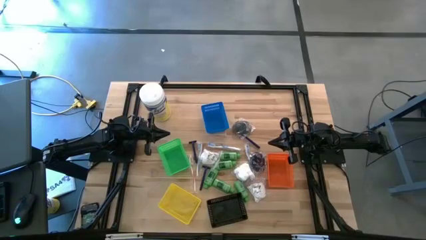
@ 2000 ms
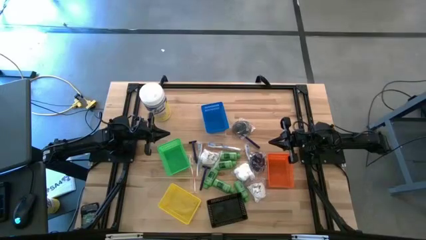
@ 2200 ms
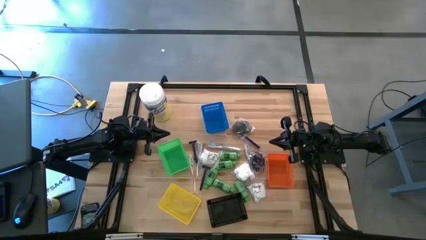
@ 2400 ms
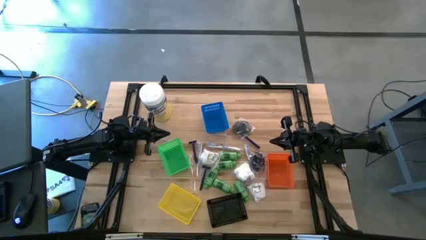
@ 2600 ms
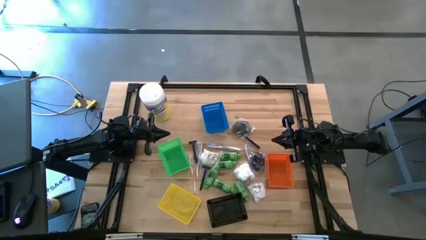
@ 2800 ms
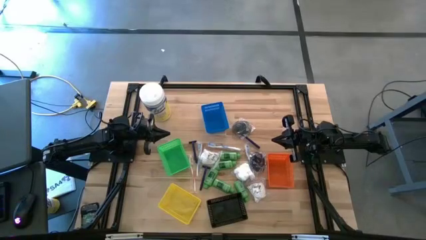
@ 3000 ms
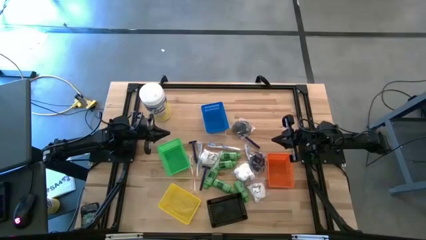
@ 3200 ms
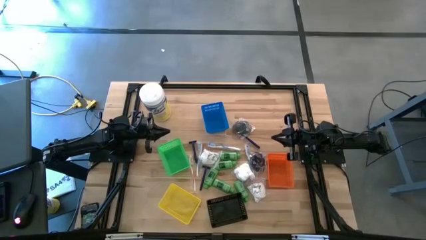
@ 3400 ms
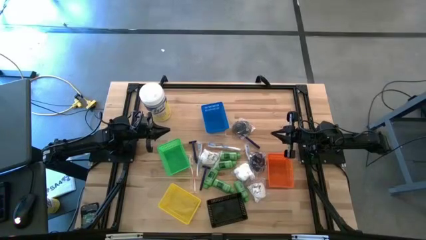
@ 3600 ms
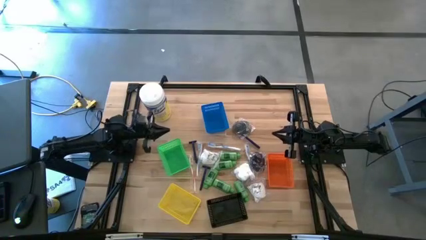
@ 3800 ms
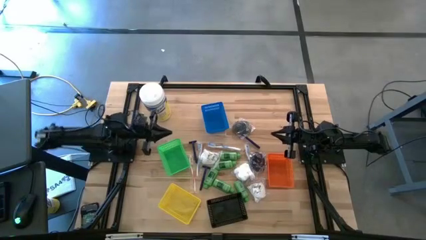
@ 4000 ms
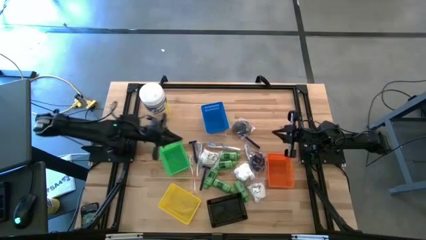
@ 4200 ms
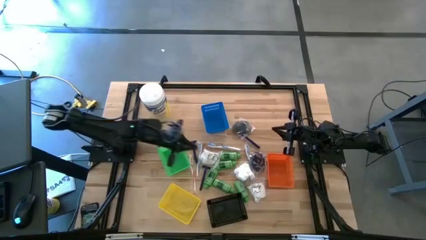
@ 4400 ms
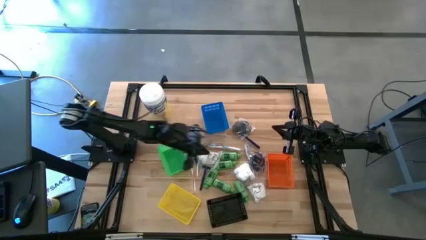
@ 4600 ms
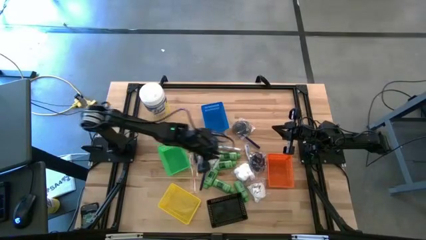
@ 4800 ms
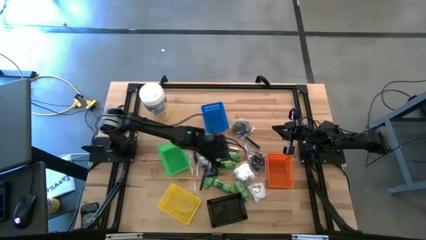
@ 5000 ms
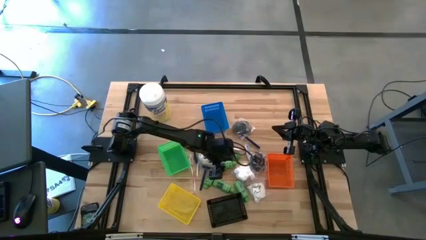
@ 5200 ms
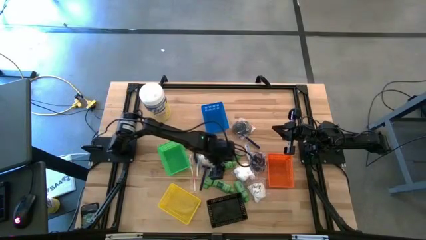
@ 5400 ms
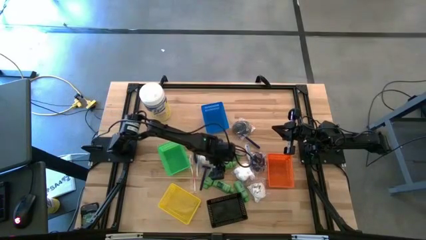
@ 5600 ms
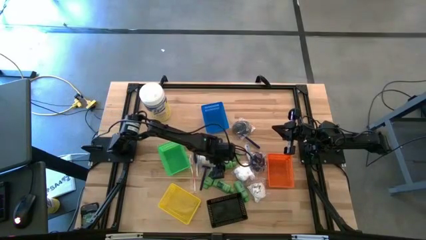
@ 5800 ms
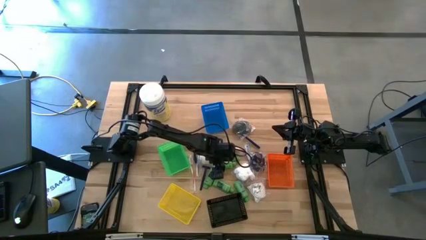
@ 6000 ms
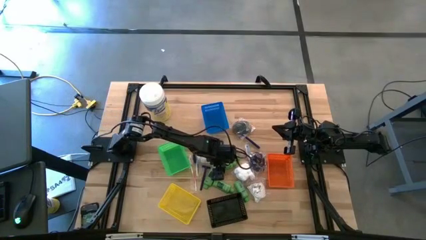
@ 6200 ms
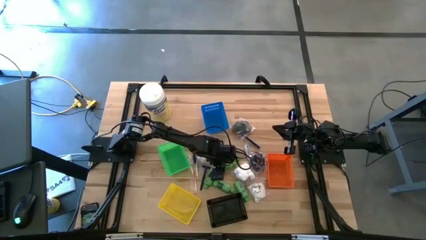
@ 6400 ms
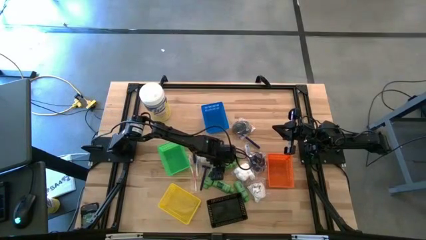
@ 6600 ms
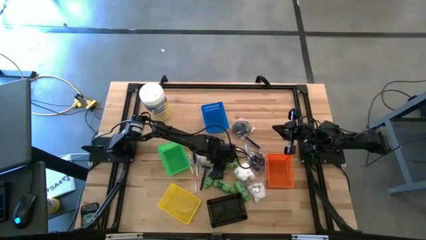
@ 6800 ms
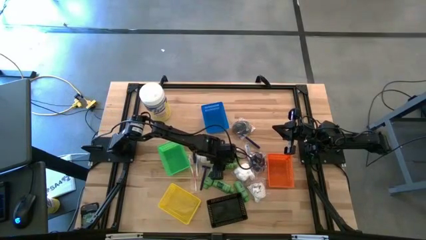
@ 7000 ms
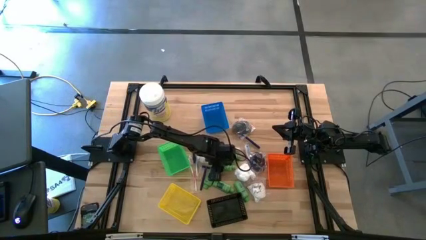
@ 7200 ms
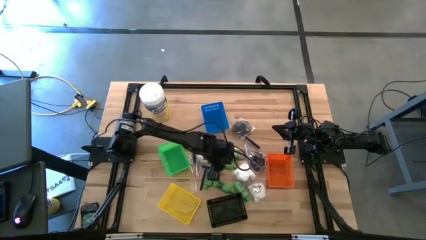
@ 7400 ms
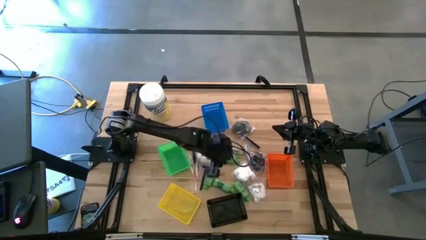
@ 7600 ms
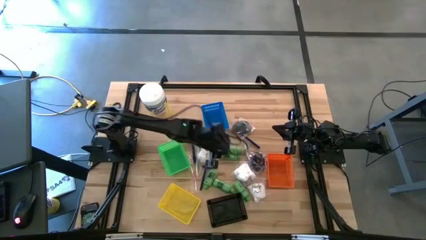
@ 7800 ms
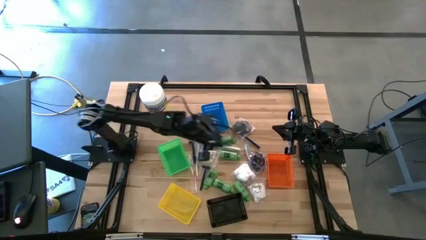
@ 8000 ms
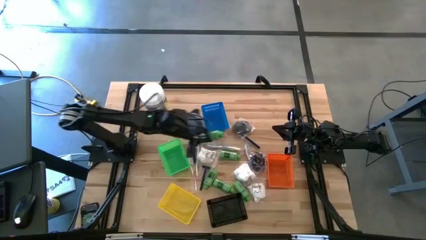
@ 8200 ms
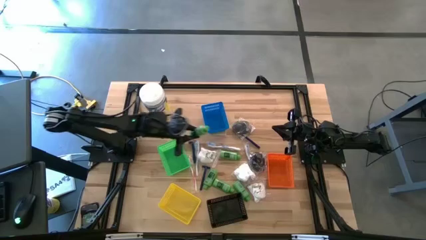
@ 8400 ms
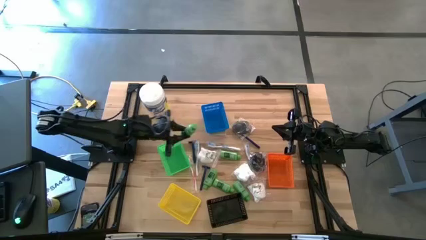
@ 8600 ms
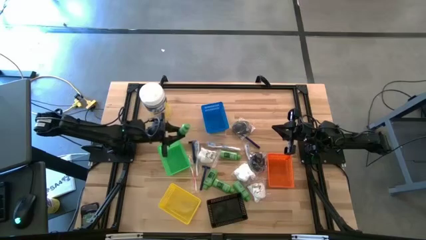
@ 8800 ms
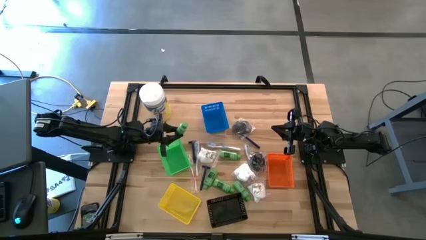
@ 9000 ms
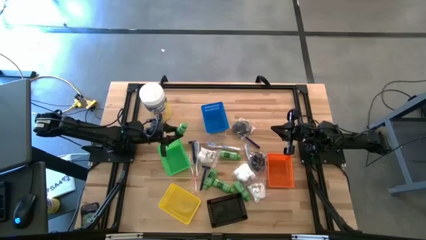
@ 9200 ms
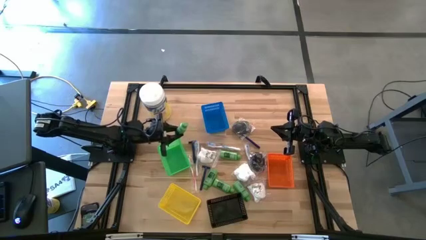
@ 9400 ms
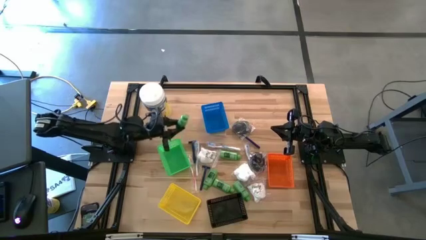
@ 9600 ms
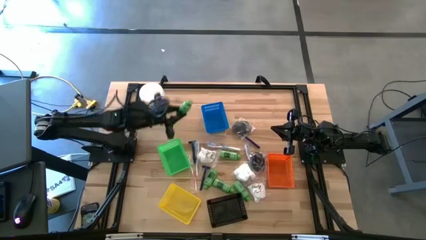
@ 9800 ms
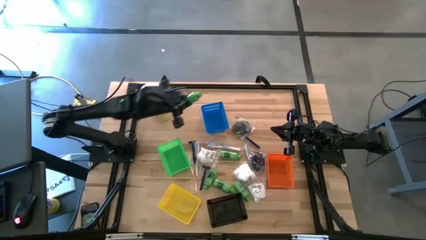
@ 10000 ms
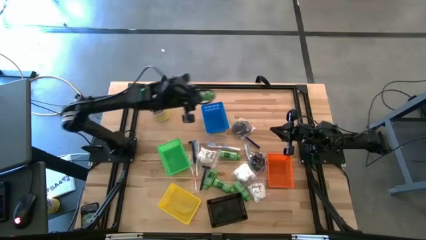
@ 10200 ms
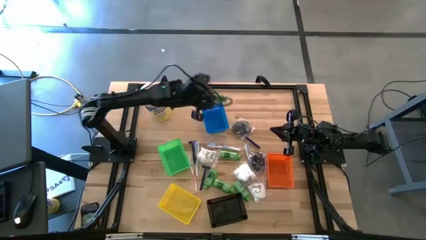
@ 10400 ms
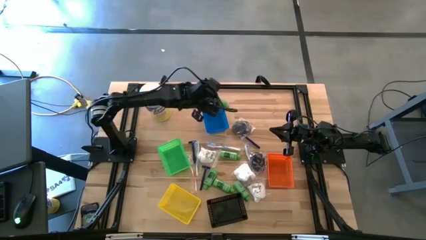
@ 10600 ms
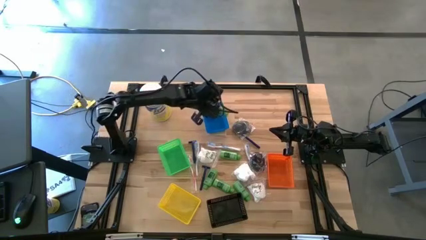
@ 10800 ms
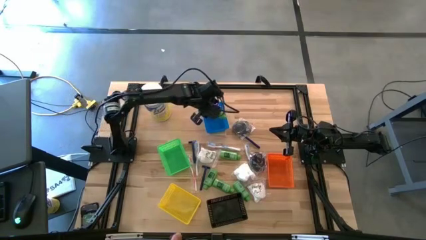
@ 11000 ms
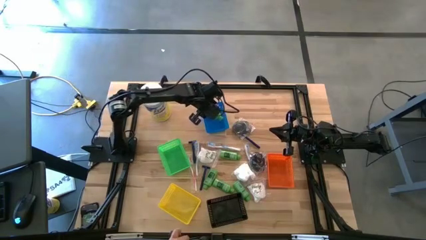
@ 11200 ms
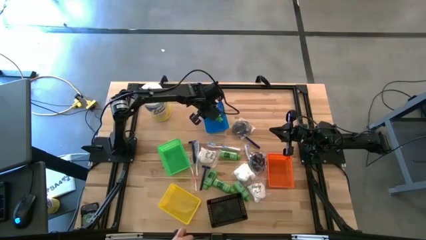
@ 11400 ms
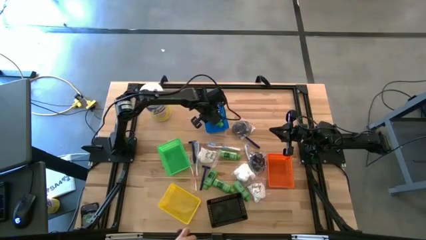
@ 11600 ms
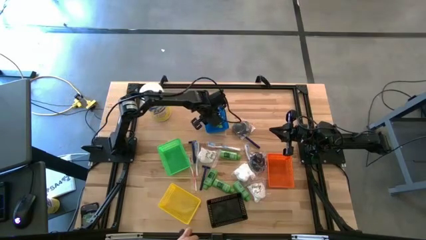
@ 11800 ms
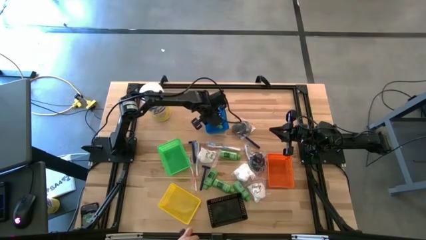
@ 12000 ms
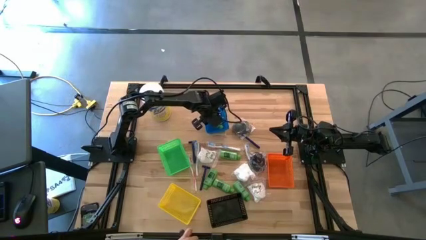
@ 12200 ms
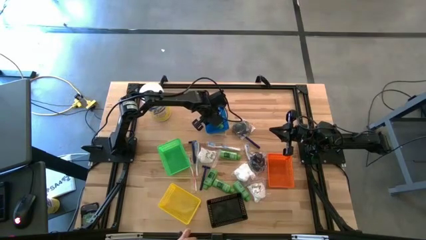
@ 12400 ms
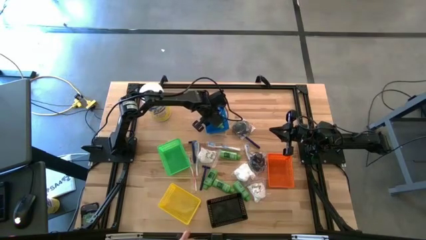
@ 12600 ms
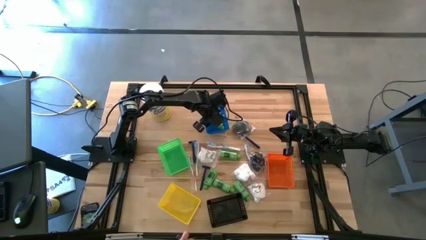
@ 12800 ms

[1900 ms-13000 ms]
Task: Pick & Place Travel size toiletries
Put the shampoo bottle into the blue bin

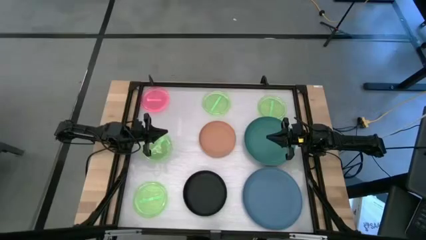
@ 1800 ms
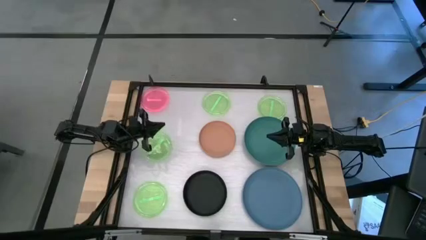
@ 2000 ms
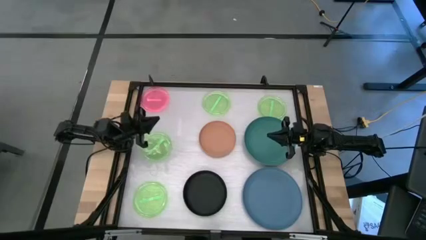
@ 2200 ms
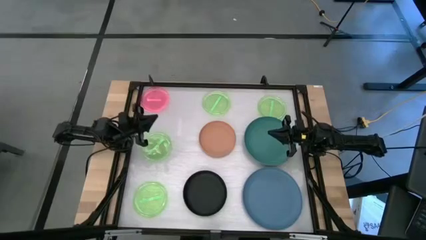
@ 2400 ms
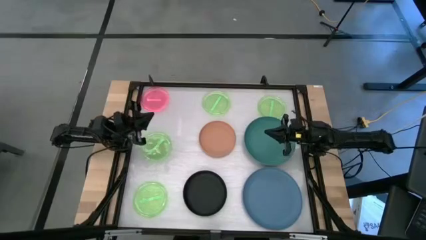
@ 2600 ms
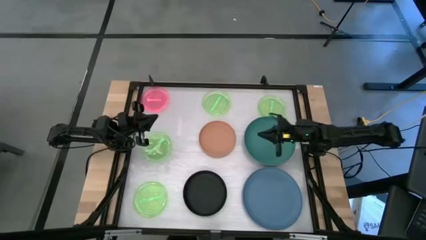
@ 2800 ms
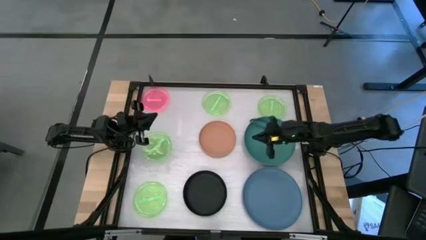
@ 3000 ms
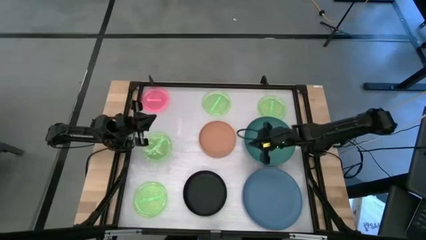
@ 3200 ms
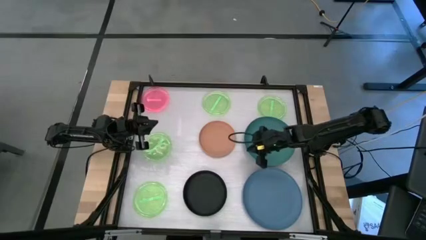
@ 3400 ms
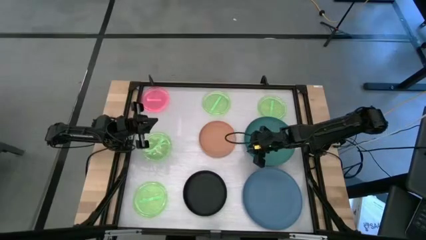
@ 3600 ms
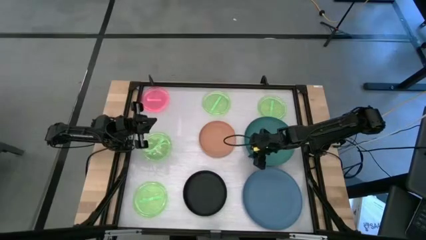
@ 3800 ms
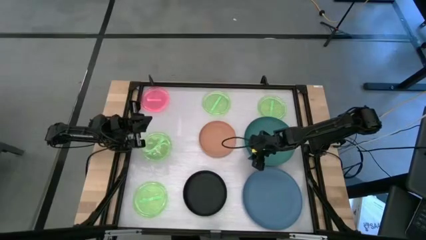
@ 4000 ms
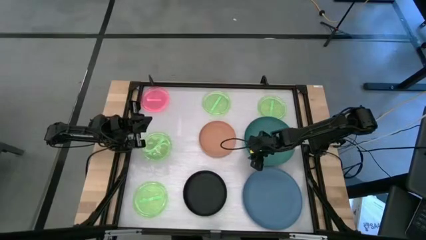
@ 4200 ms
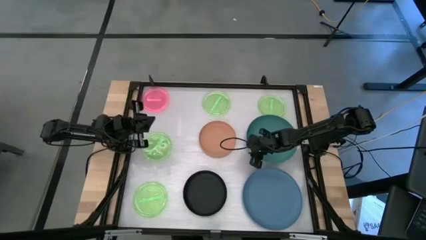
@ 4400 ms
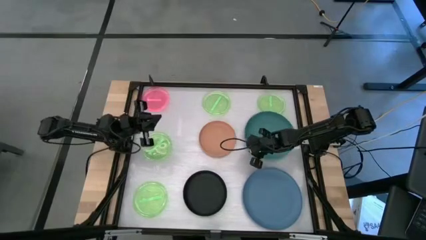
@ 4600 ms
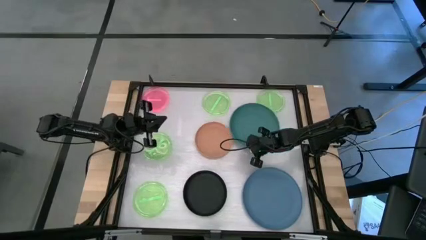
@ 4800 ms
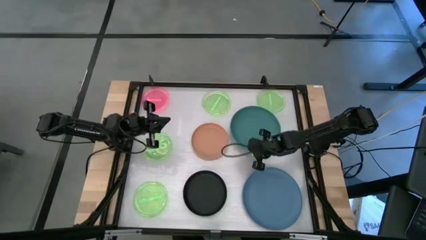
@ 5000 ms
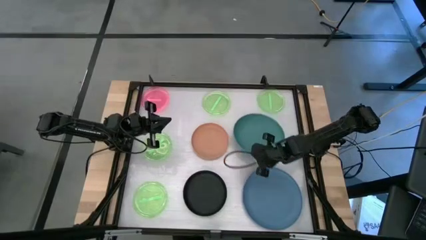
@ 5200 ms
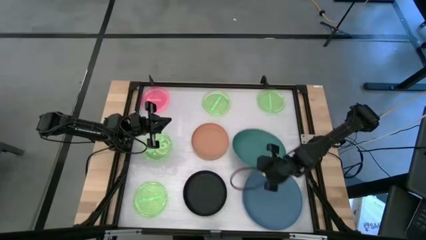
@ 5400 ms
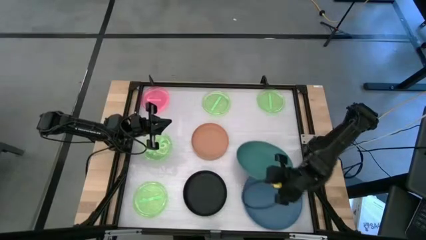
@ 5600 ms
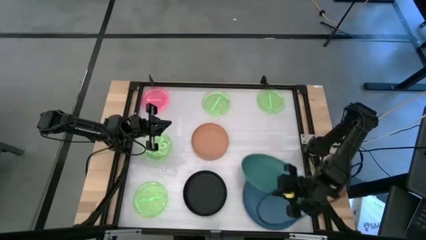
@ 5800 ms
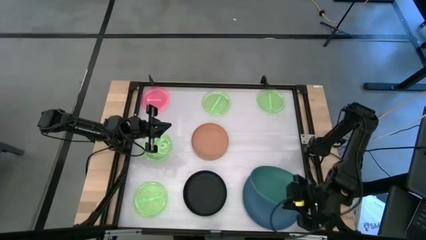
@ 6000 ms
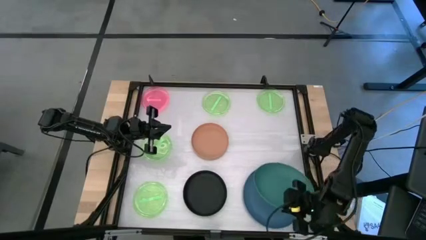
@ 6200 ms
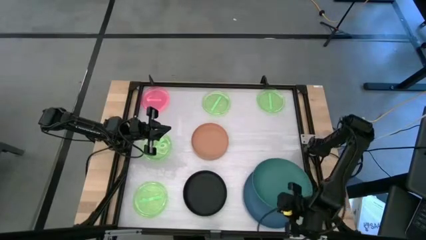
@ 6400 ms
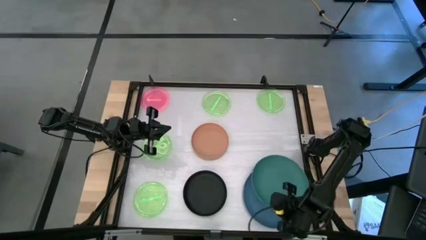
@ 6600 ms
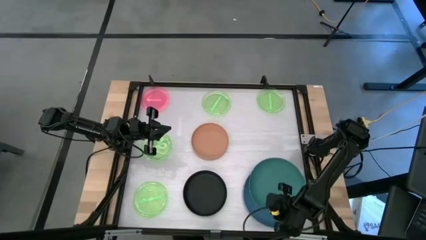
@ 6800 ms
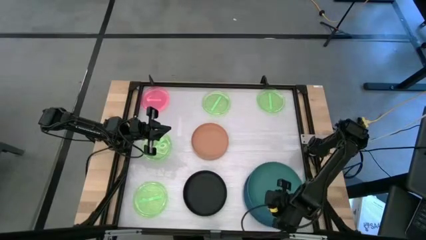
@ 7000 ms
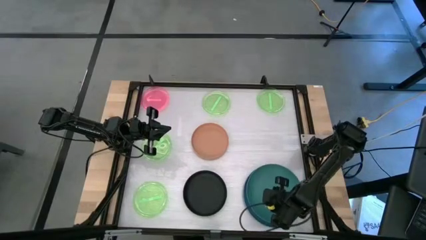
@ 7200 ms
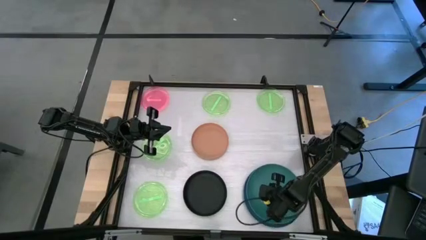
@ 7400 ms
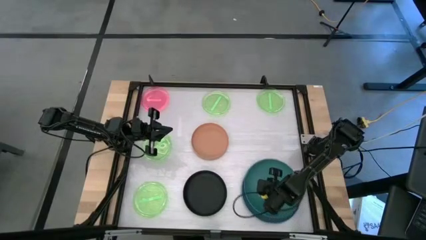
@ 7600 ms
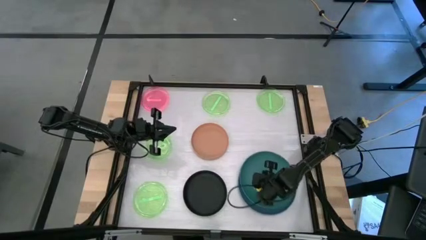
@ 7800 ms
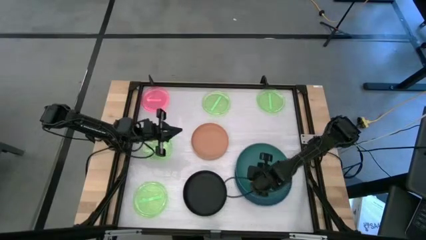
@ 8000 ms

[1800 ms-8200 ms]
Task: Stack plastic plates
Stack the green plate on top of the blue plate
